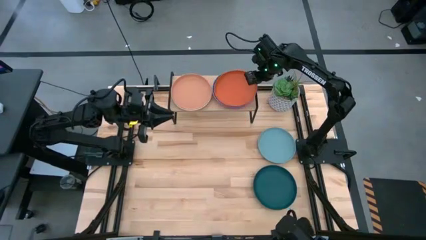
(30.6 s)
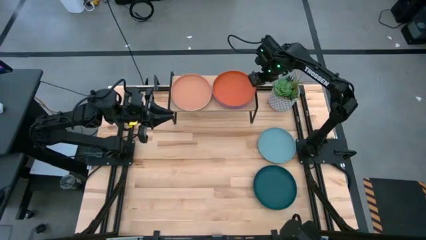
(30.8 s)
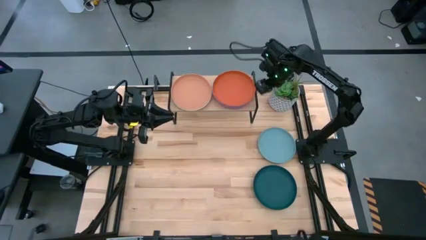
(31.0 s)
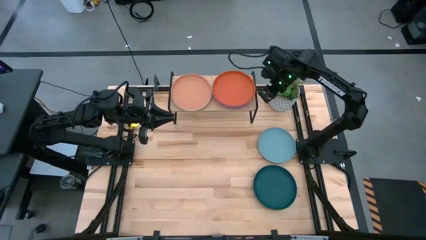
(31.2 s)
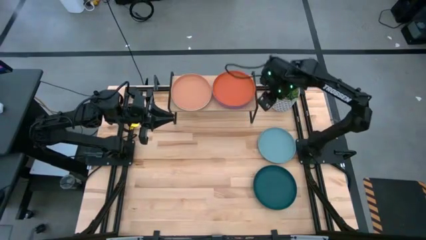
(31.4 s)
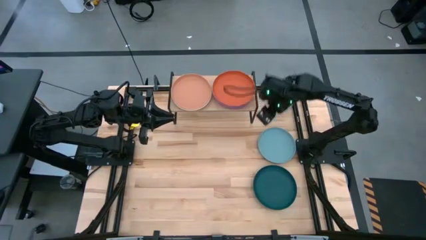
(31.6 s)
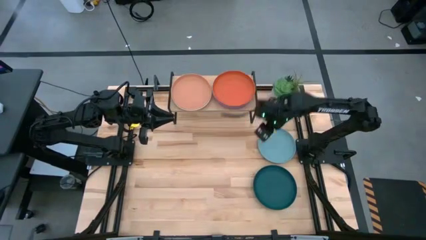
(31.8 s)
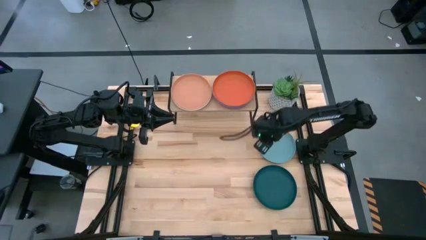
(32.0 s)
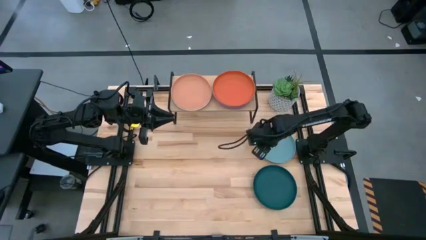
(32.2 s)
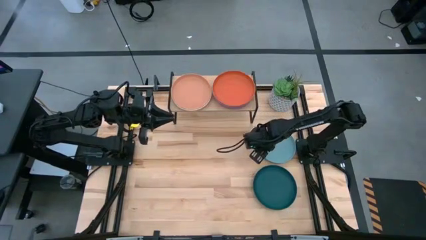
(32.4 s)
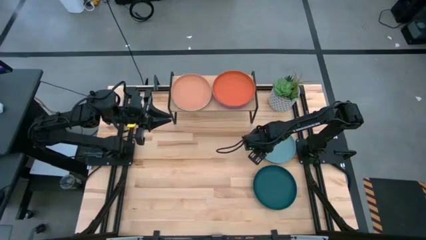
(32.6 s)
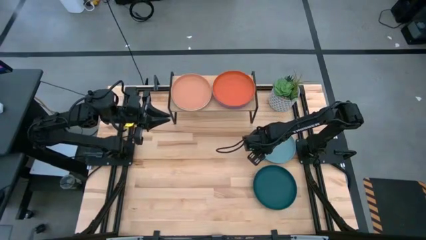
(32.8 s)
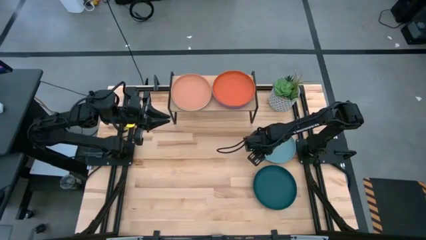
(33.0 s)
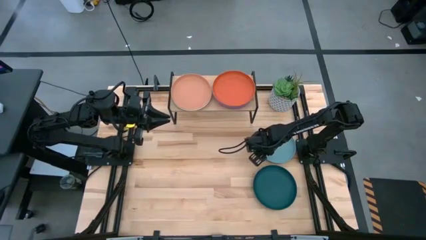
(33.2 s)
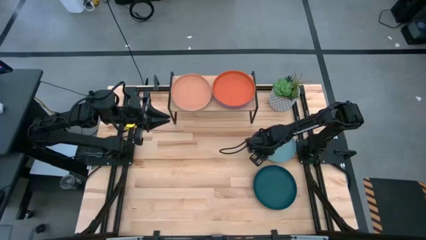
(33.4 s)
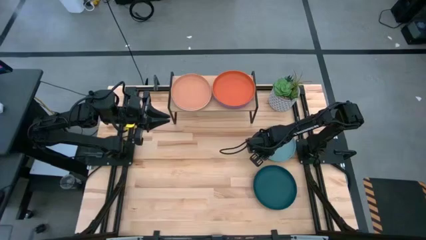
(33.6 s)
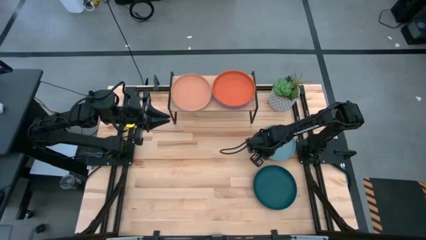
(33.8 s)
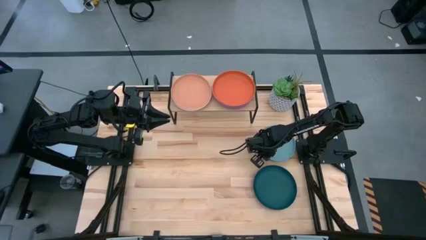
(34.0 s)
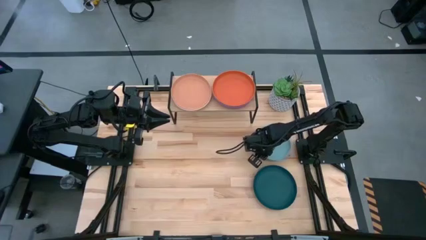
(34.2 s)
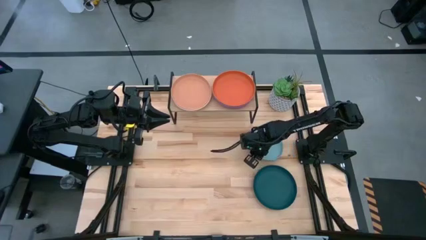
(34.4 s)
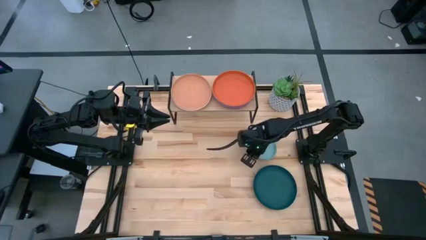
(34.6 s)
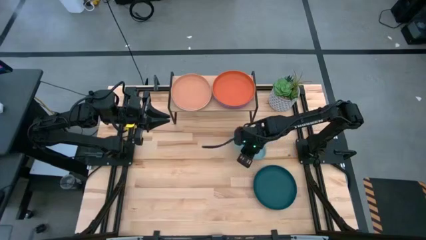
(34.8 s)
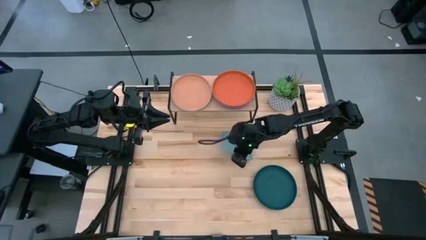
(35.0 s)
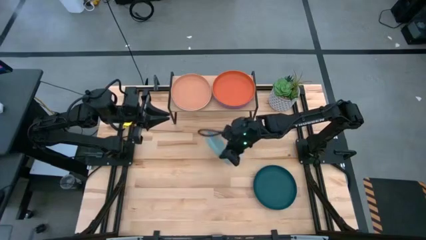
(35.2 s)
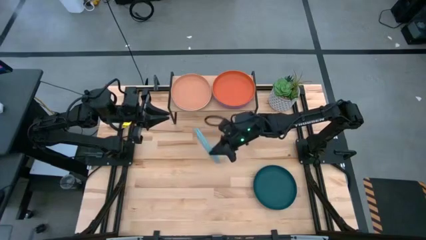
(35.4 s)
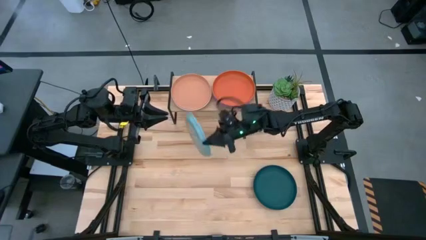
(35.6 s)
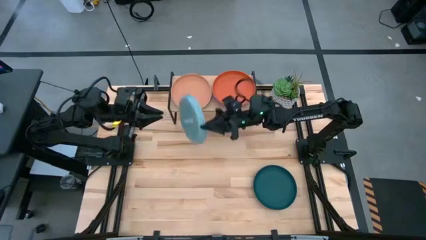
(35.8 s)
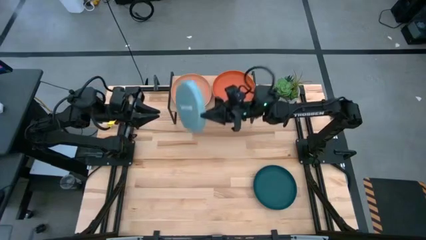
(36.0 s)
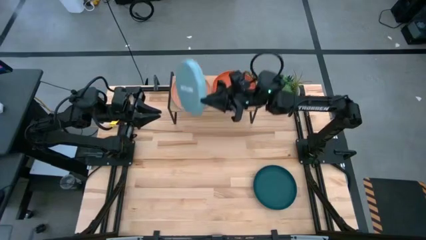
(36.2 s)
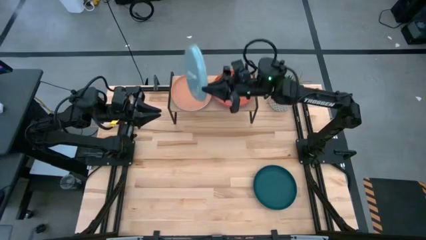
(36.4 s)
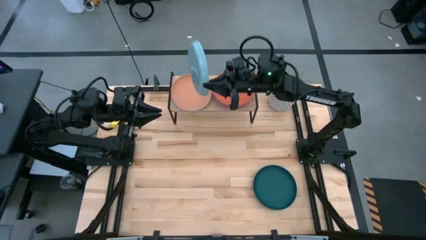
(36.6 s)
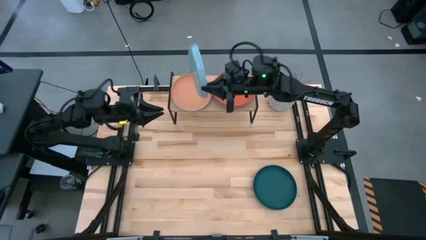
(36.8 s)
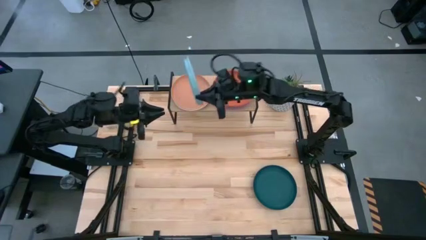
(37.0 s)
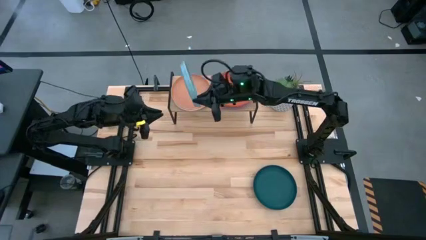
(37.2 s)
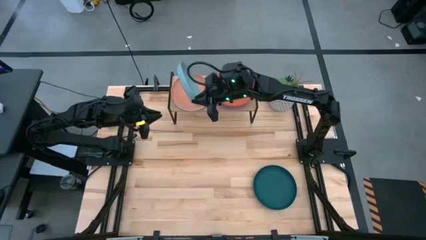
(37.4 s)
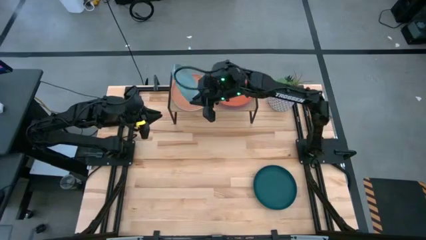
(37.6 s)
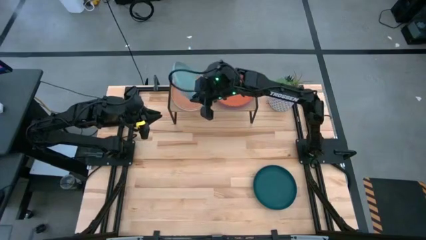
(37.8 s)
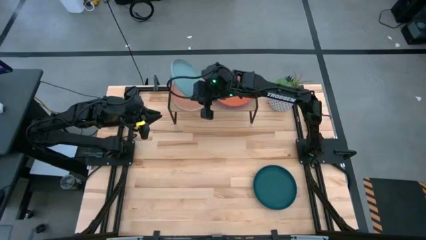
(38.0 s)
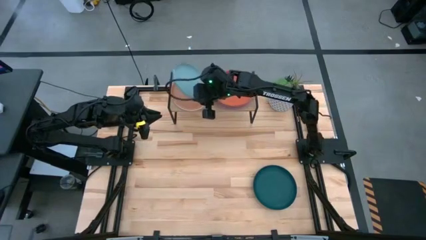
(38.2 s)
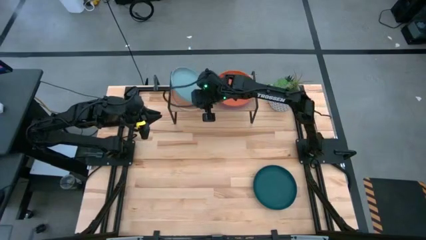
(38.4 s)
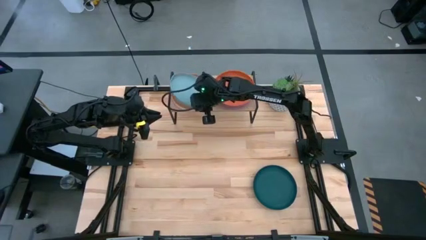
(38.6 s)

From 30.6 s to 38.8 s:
Task: Place and stack plates onto a shelf
Stack the light blue plate on the brown plate on the shelf

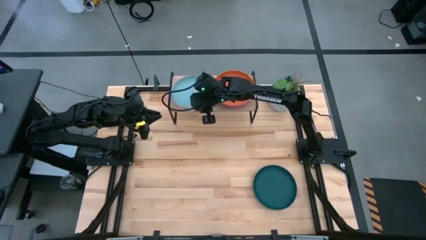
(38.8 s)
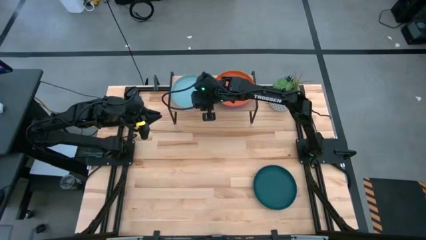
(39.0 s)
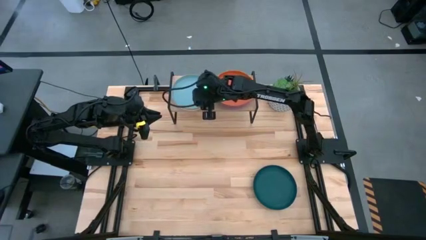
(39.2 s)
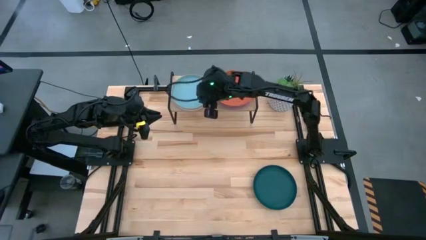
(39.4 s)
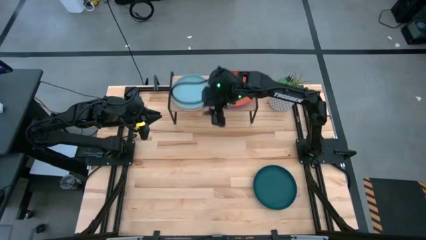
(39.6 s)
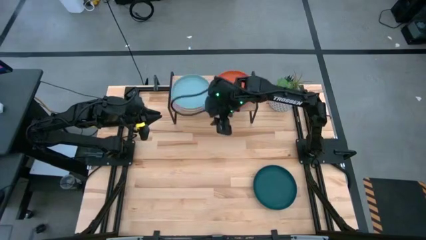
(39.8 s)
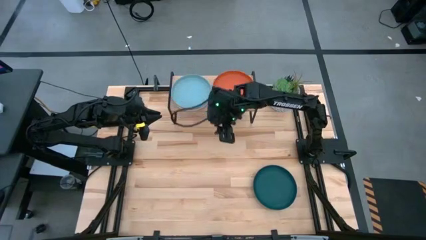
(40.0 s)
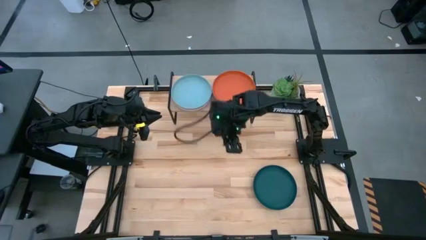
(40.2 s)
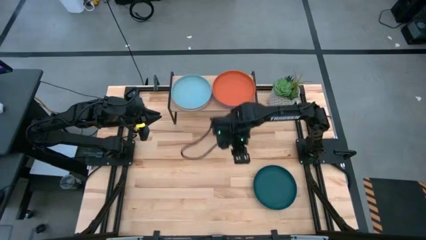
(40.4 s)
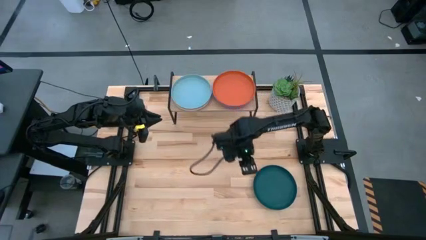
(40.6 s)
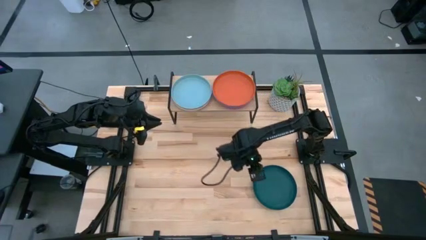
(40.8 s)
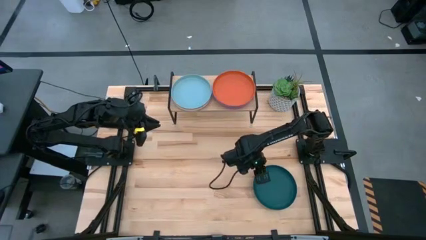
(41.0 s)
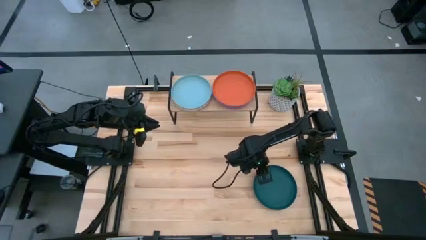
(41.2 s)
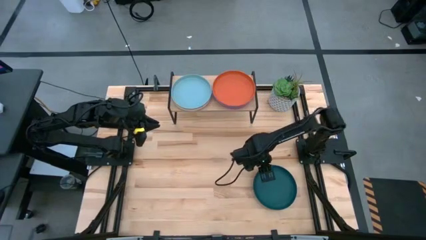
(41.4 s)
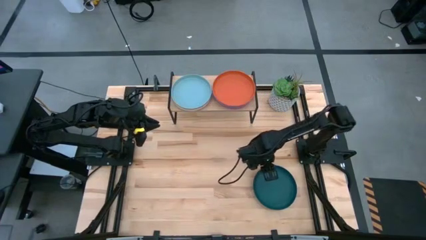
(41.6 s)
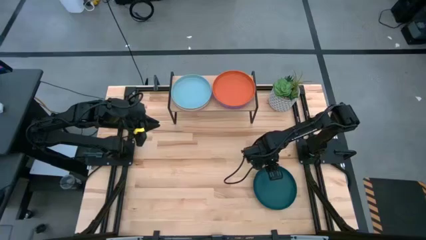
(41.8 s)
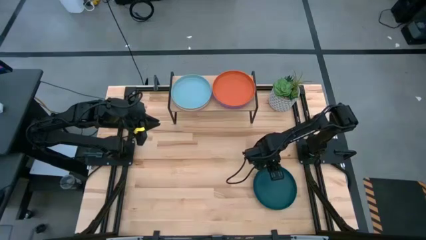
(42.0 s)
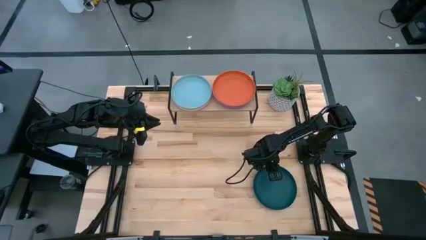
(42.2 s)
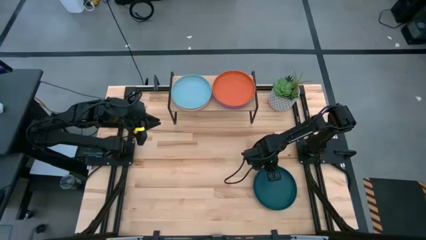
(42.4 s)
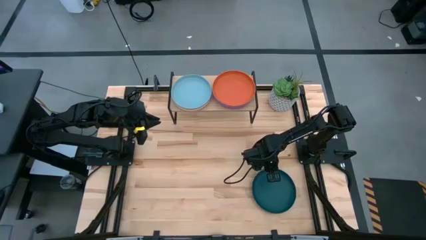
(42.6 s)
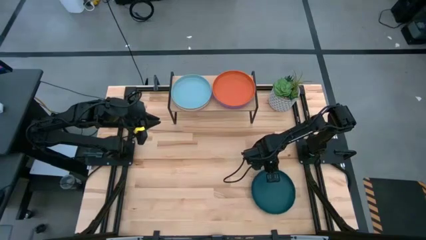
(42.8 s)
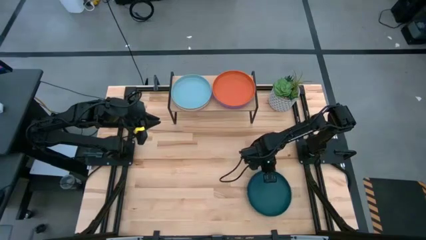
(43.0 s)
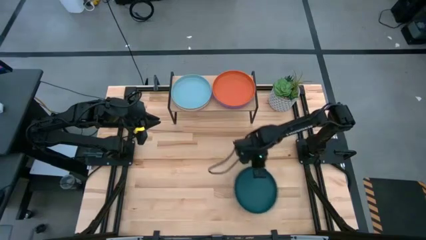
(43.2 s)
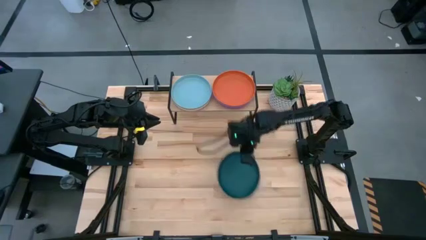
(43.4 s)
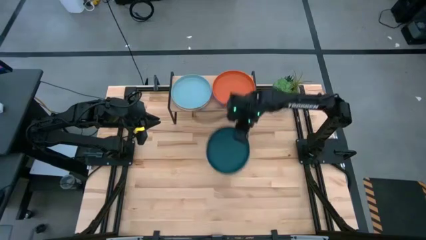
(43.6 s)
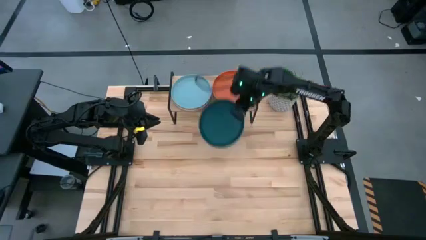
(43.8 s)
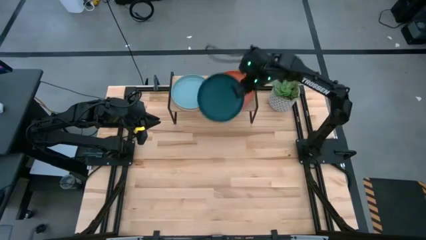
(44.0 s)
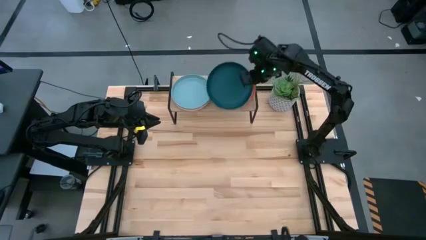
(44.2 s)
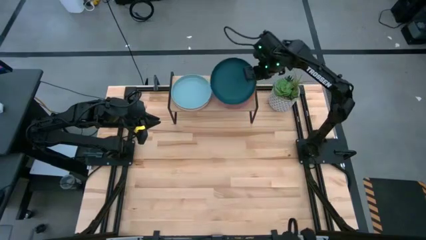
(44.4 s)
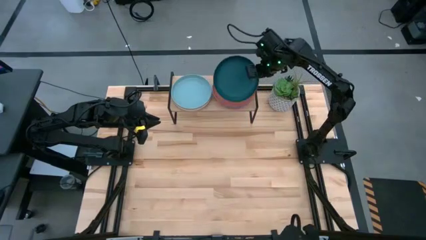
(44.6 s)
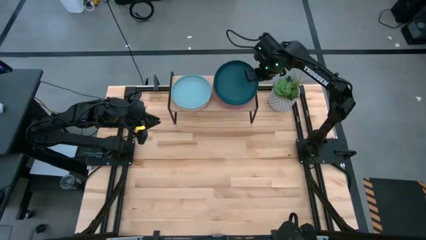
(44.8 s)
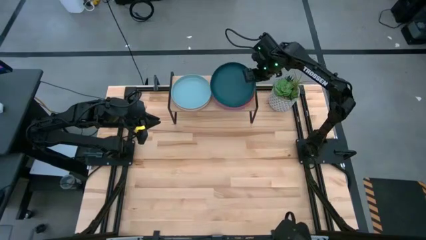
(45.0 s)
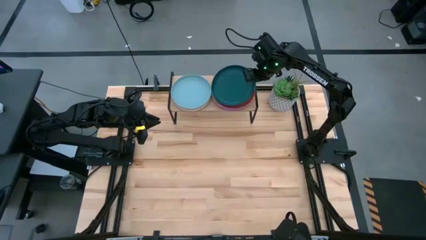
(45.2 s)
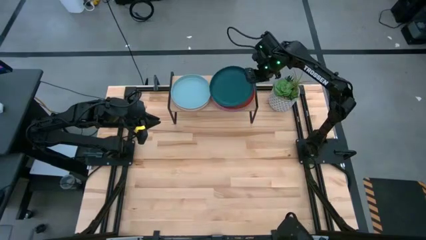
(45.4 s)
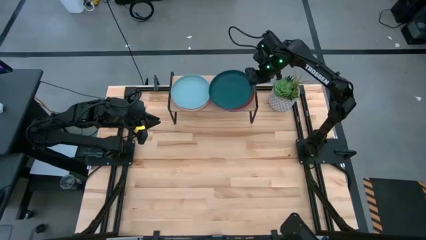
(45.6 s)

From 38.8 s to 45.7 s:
Stack the dark green plate on the orange plate on the shelf

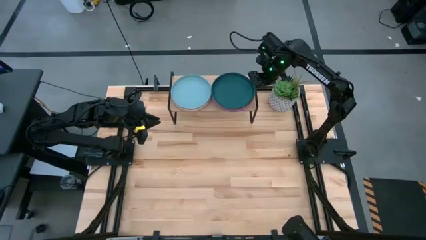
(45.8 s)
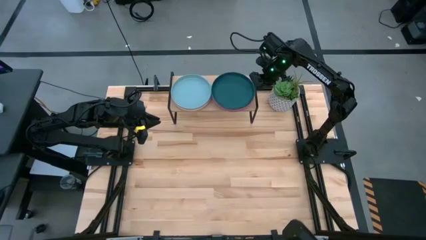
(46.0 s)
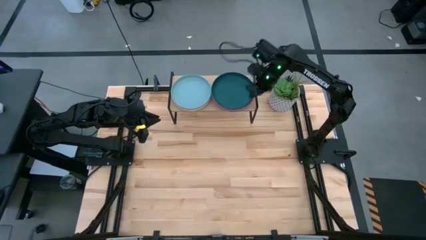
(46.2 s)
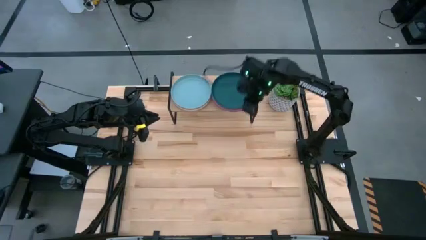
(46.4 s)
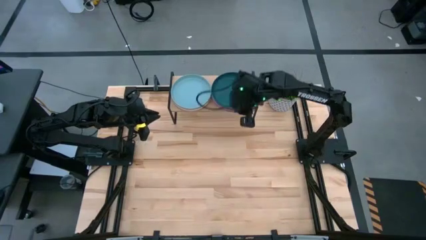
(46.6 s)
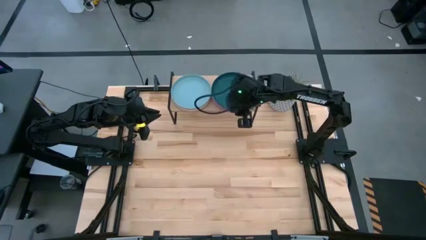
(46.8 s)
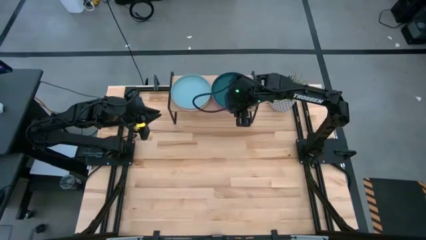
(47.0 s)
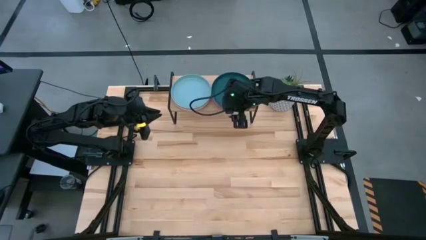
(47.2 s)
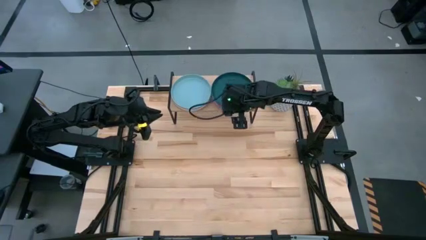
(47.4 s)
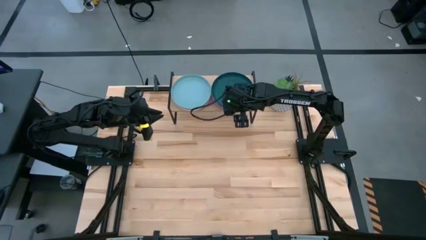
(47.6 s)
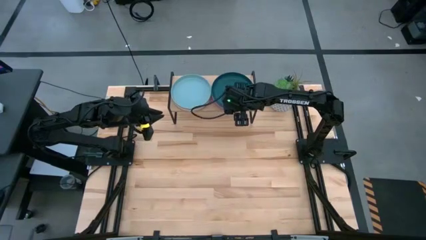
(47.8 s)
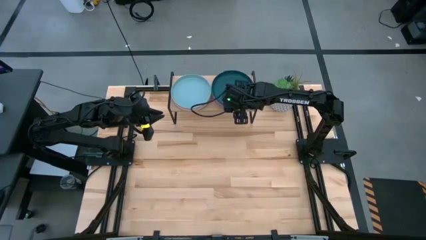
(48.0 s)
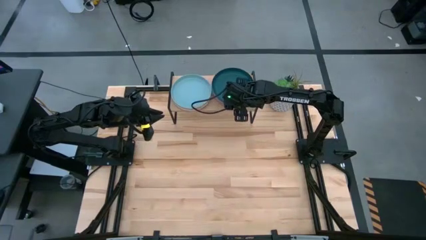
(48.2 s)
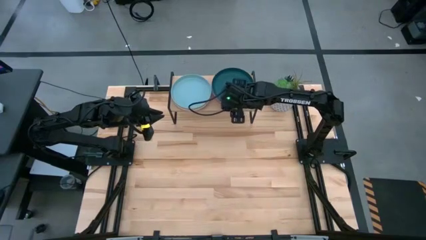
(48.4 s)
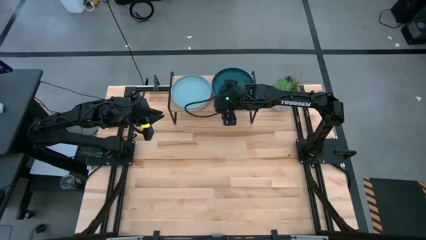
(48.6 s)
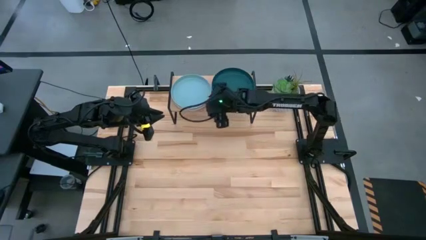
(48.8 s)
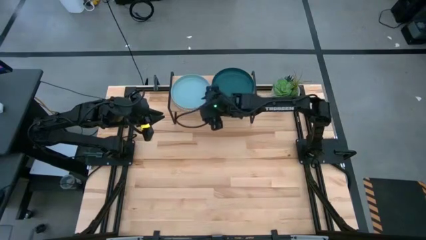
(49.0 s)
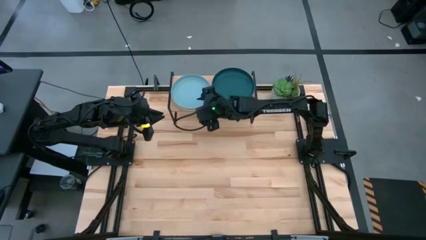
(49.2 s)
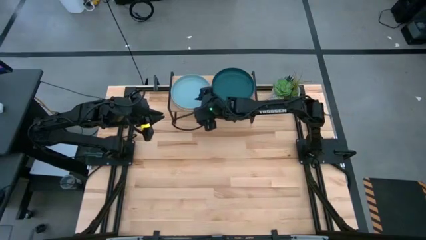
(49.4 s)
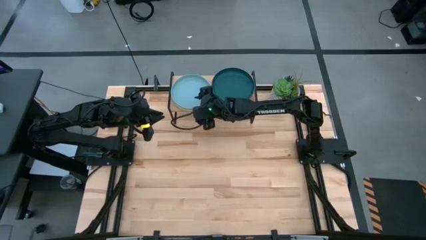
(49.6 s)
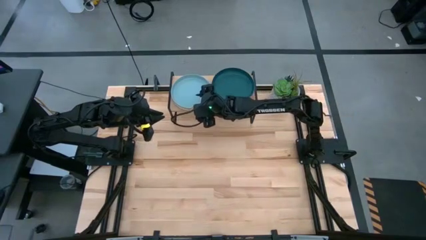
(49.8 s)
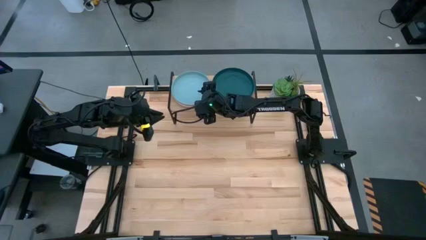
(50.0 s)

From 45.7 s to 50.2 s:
Adjust the stacked plates on the shelf
